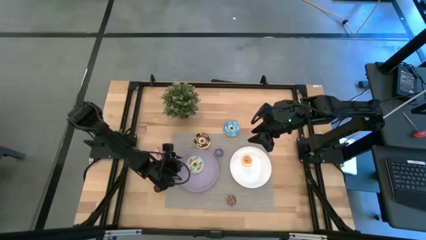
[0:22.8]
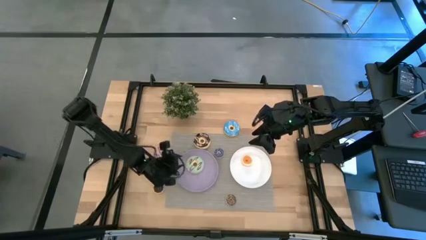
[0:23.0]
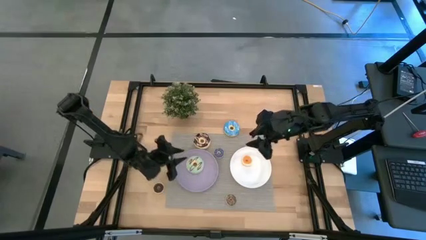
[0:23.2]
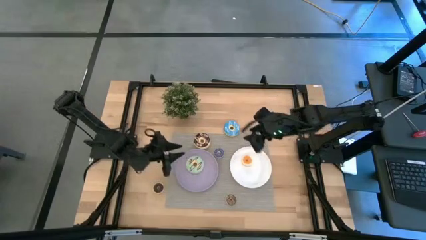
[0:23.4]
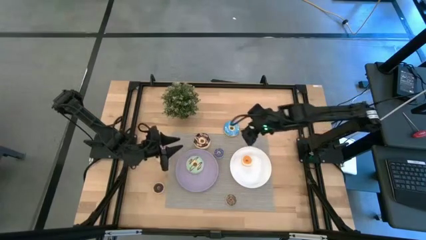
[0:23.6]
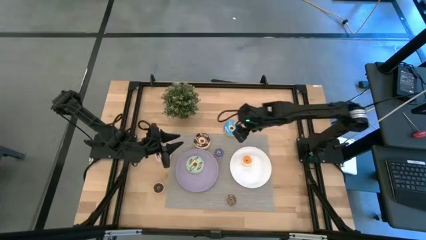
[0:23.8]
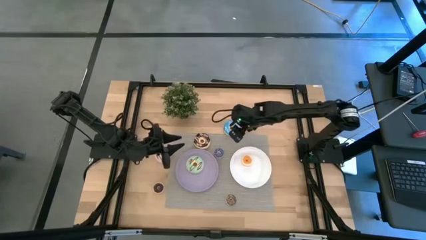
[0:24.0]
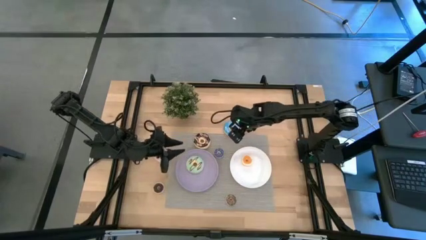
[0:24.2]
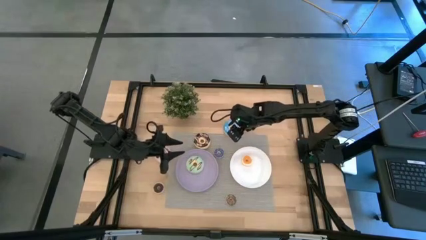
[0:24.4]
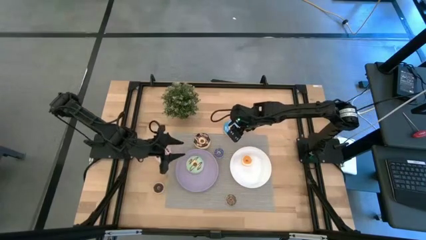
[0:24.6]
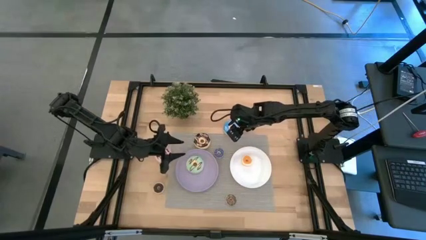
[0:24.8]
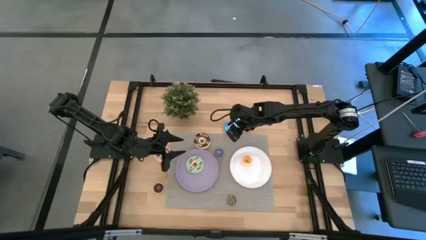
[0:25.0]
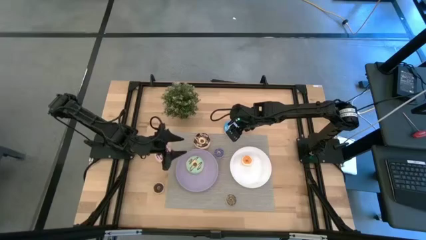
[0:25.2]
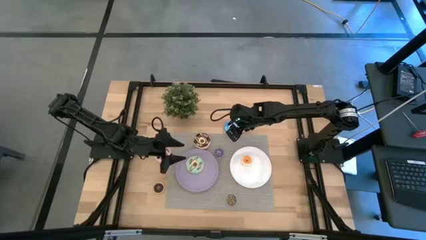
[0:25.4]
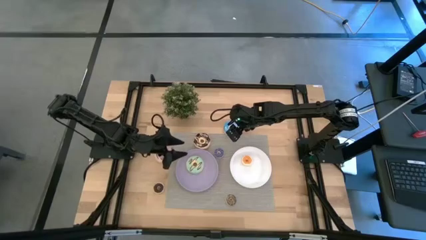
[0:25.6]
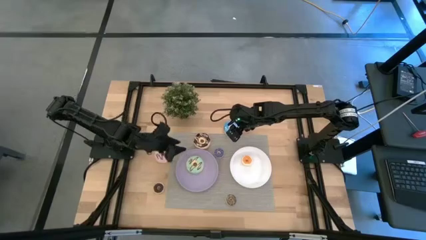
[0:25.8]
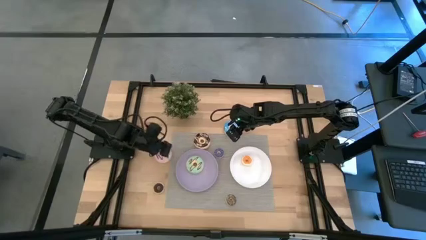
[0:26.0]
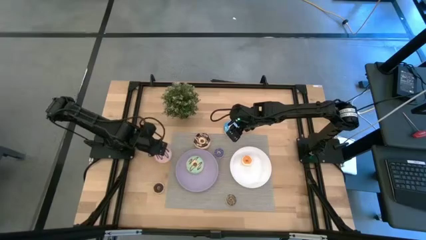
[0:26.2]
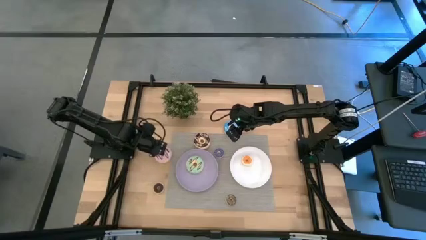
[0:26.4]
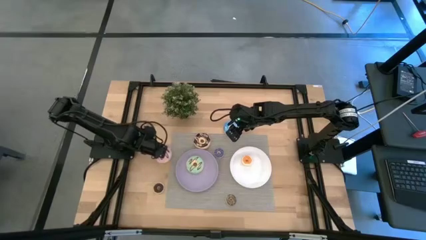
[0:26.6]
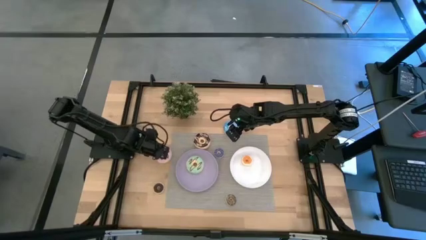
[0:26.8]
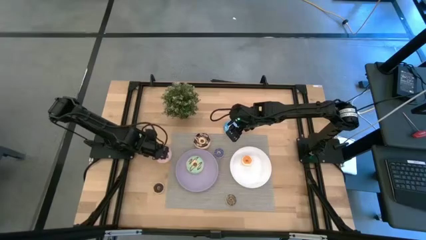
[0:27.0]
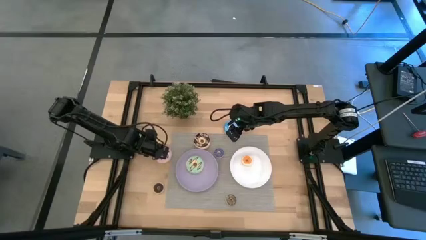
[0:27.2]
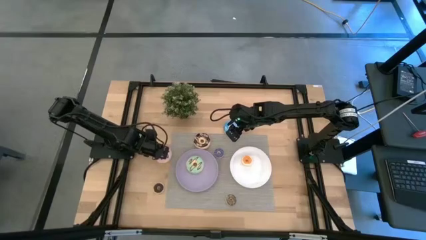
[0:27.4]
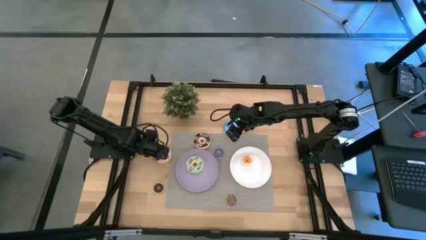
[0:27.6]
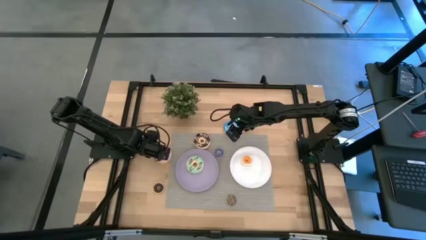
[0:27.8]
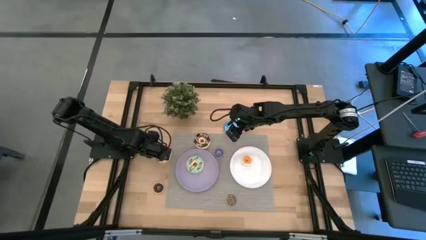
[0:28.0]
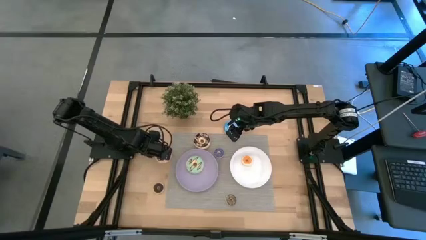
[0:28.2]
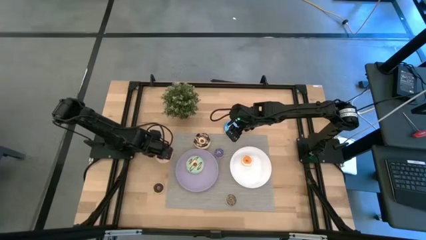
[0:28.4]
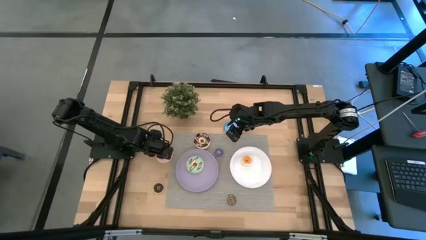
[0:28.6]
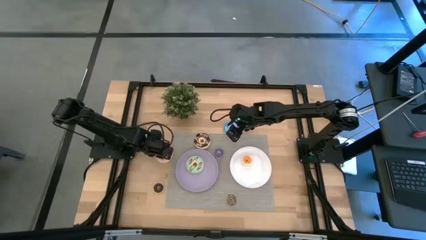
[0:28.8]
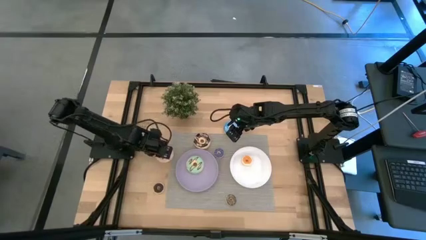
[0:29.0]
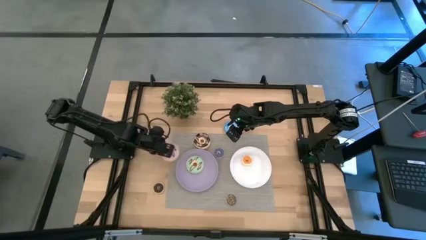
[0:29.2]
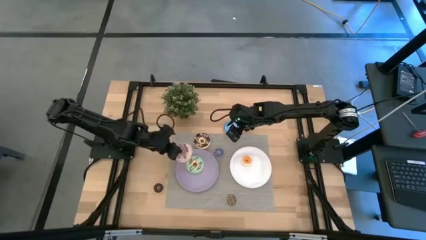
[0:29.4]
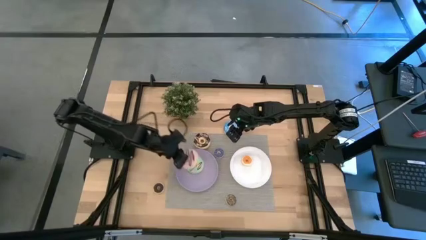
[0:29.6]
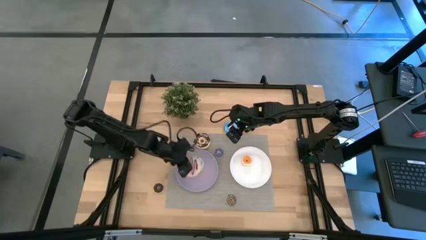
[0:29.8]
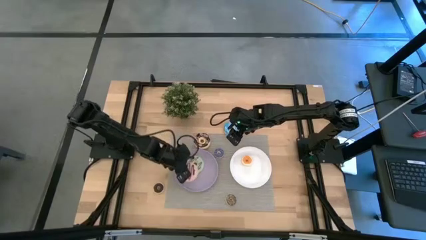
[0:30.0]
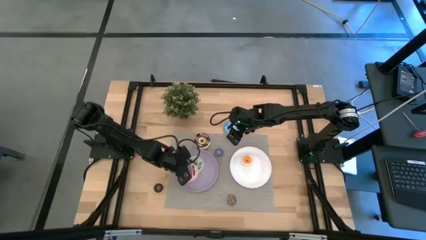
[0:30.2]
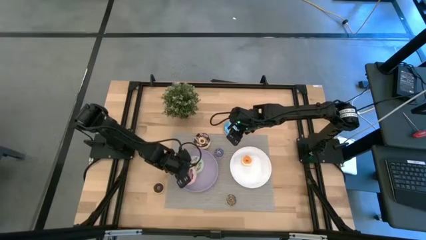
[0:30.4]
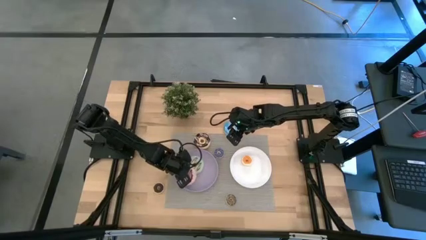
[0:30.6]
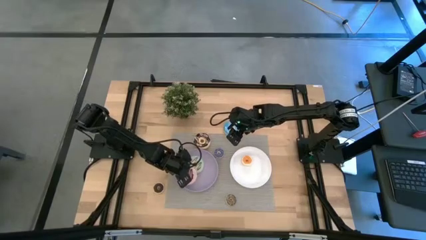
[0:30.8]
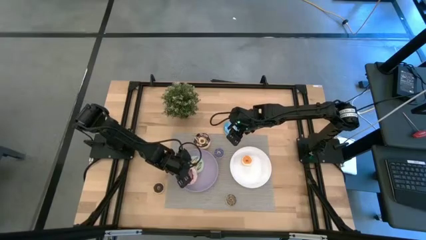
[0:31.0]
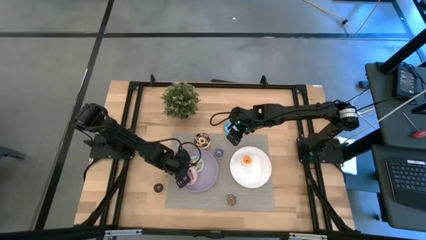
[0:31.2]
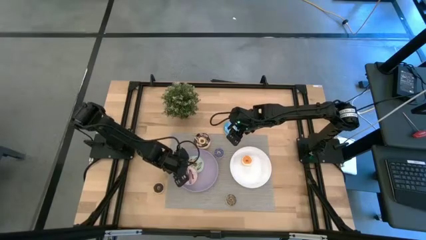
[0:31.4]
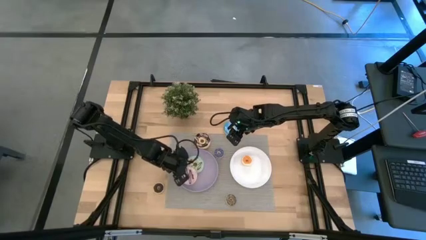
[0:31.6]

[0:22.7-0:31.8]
Task: Pick & Place donuts
Put the large purple donut on the purple plate

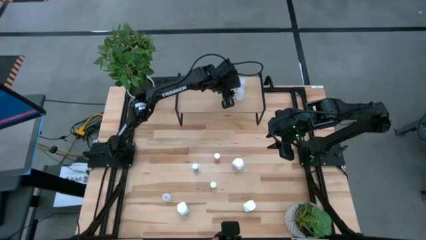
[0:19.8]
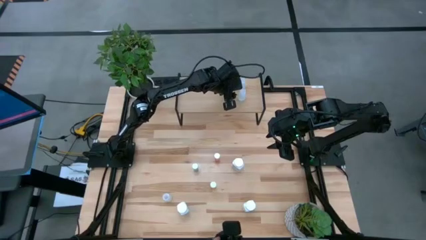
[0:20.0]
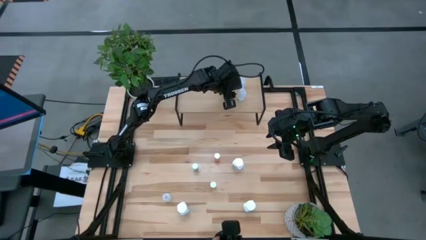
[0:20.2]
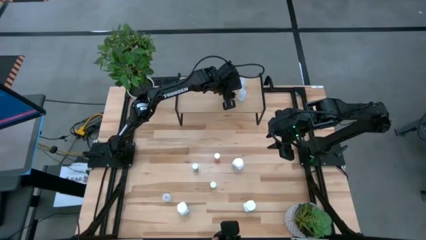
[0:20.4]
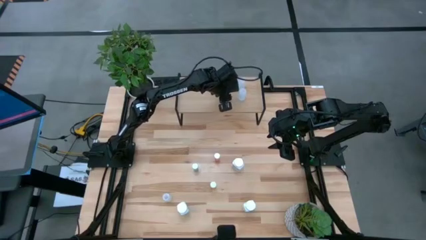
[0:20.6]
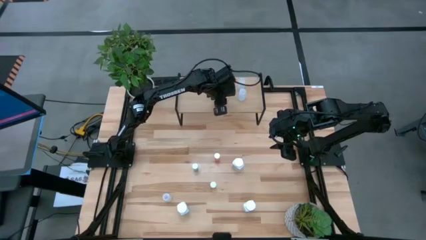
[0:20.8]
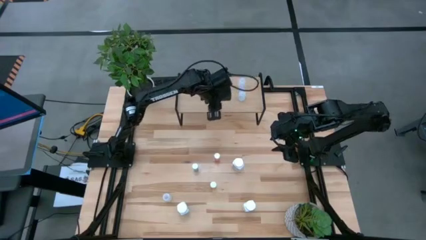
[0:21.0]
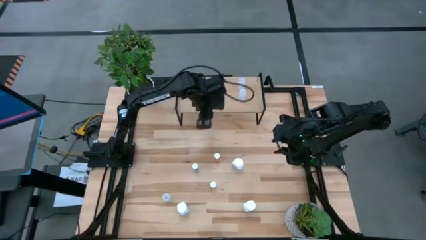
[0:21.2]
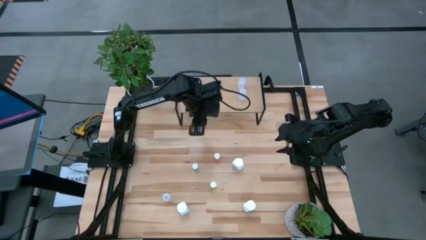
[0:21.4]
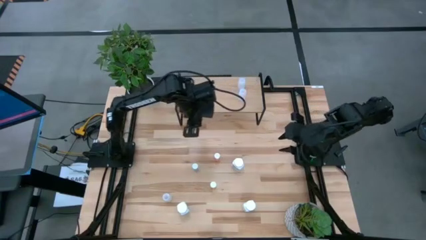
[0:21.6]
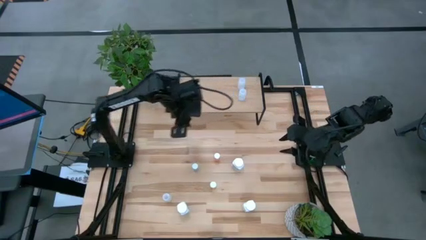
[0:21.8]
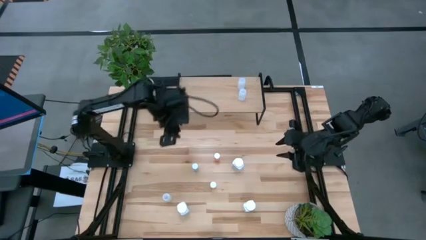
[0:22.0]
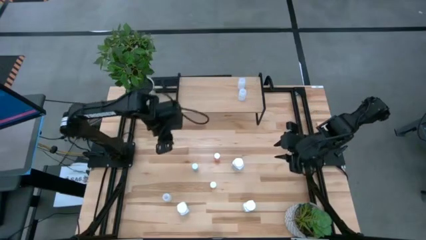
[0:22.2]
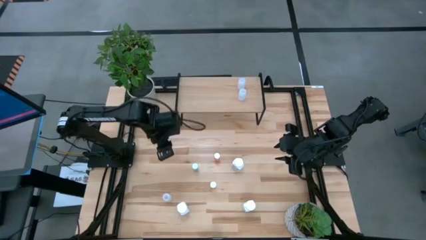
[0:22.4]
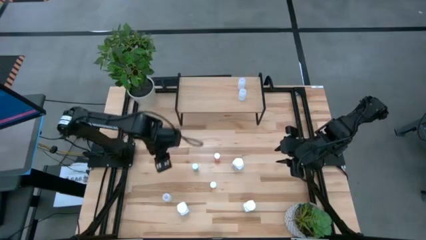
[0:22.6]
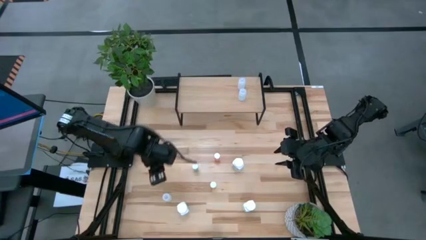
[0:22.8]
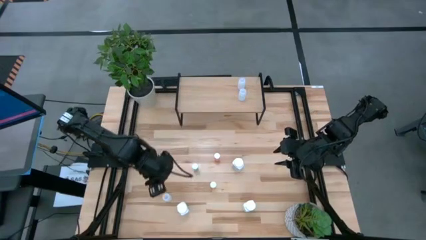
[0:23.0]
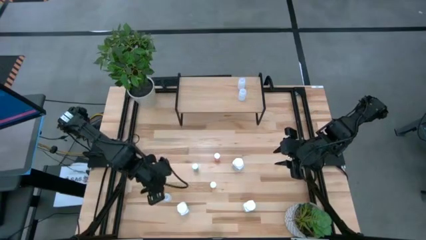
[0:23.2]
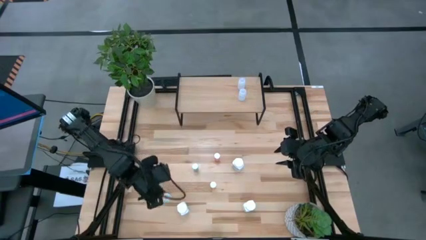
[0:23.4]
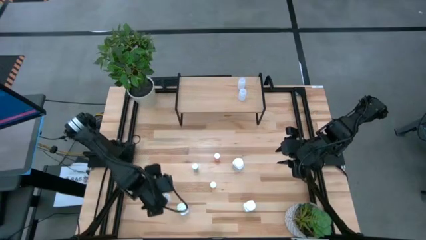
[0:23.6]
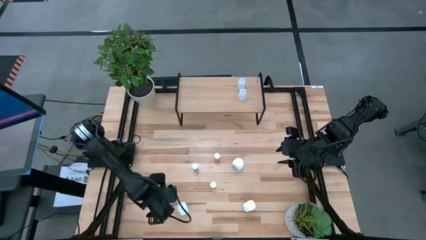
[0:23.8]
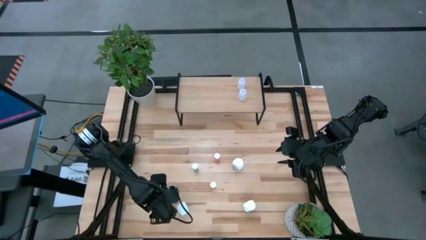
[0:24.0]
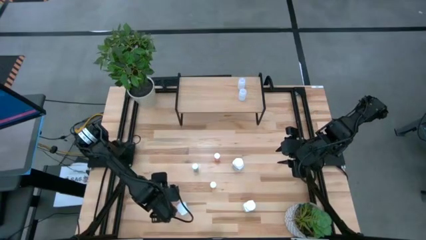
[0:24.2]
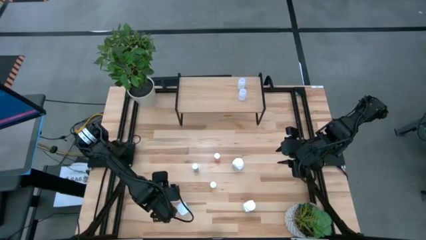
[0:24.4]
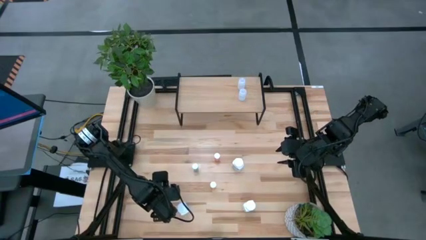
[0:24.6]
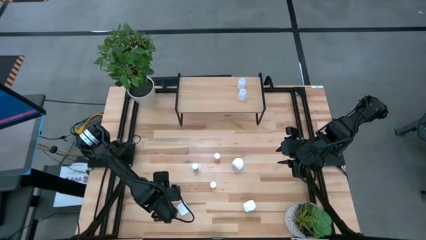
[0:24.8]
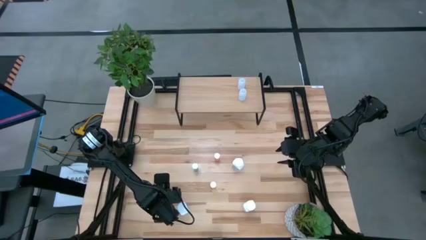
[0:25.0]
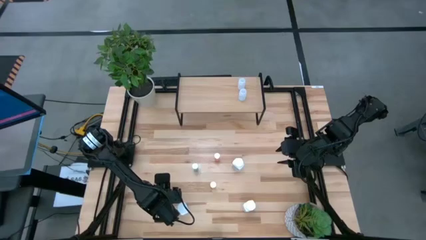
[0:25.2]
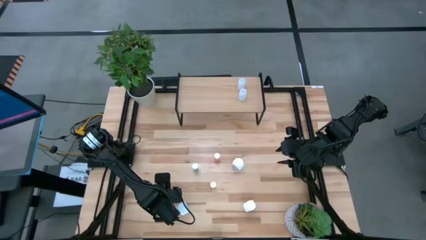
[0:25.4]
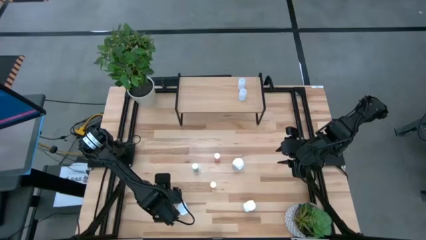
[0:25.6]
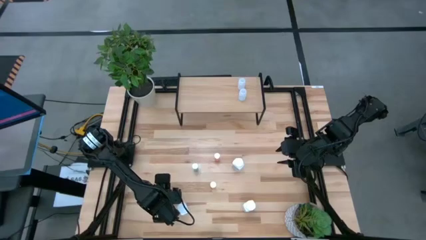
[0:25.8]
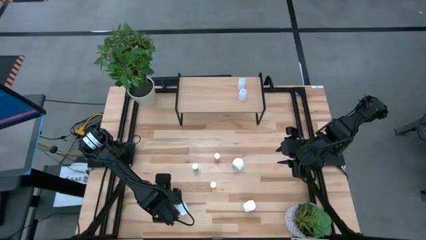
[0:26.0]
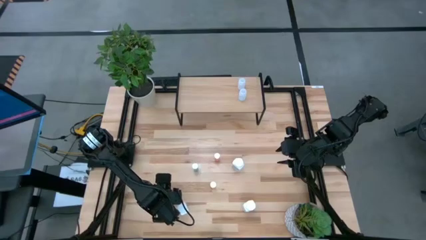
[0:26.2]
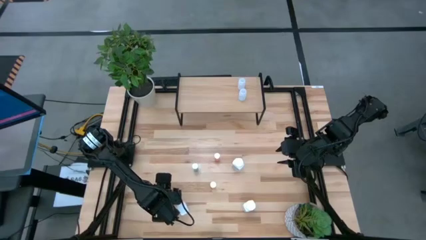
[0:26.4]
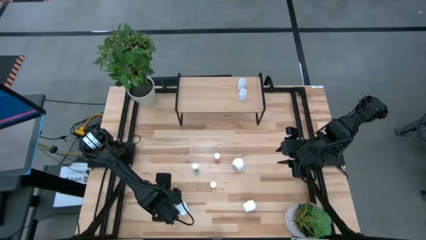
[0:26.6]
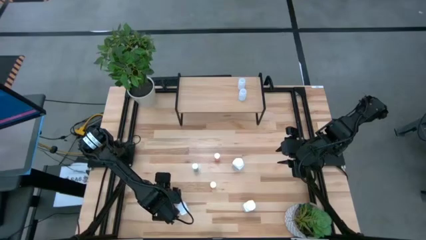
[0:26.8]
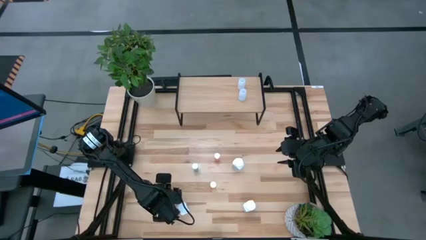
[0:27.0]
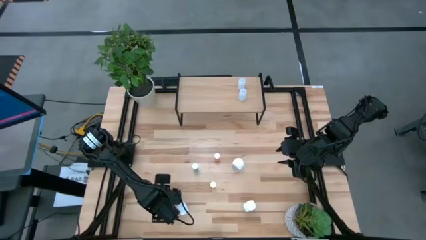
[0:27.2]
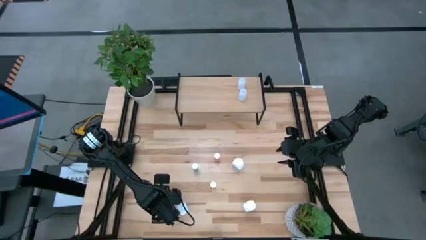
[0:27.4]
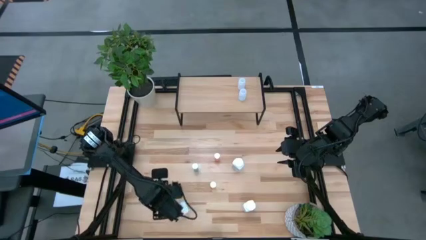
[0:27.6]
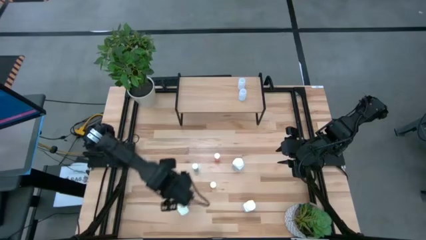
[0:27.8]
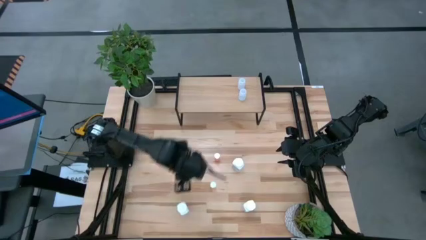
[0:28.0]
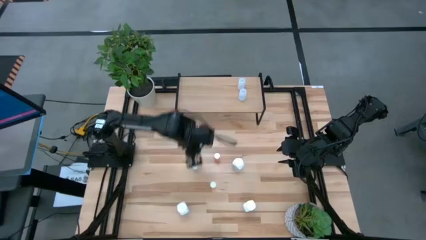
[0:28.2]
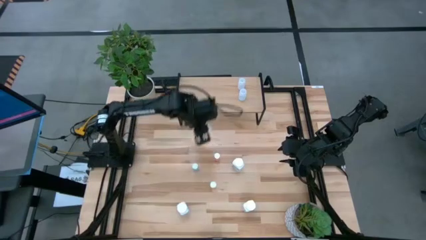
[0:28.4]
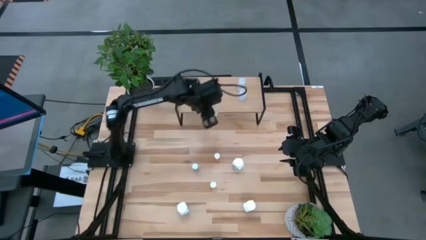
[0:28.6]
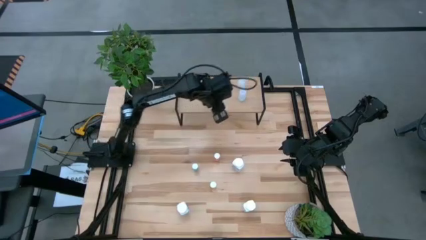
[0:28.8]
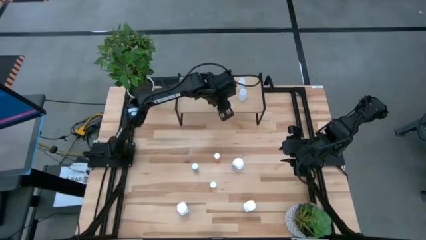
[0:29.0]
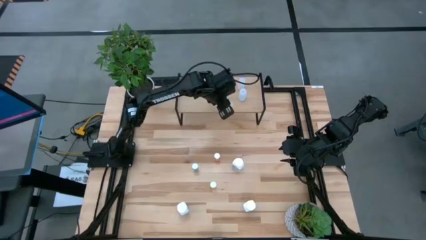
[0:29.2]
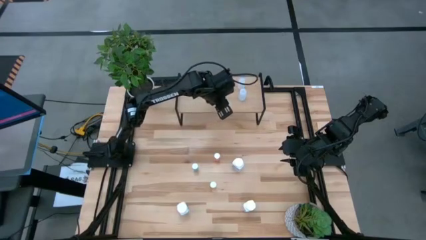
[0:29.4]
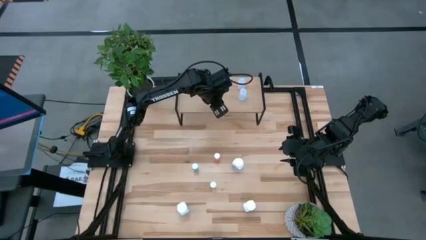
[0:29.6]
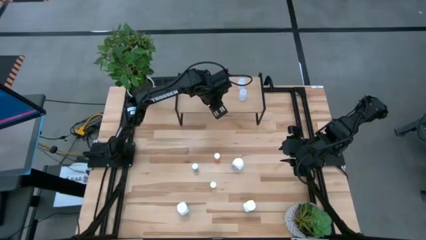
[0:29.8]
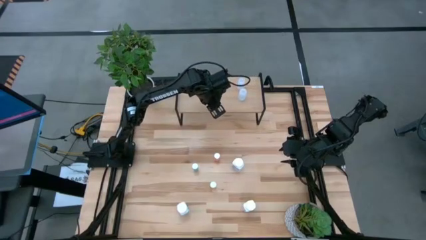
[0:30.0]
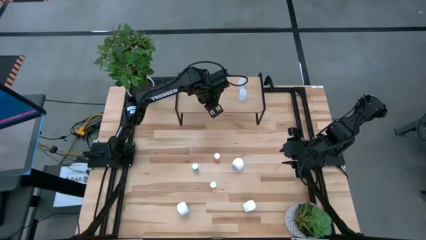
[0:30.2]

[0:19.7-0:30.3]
Task: Pick and place medicine bottles onto shelf by color
Put the white pill bottle aligned with the other white pill bottle on the shelf
